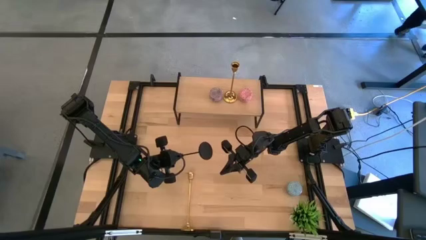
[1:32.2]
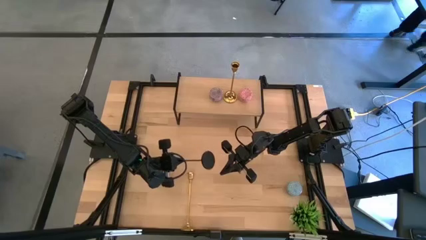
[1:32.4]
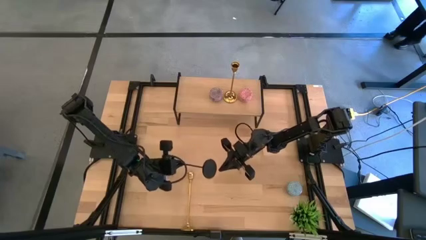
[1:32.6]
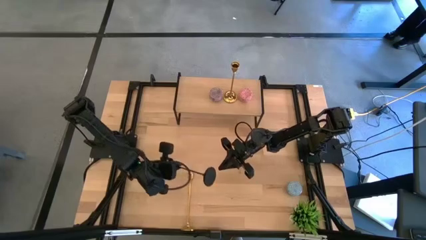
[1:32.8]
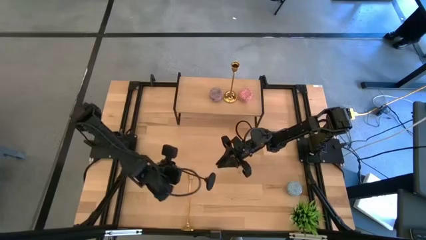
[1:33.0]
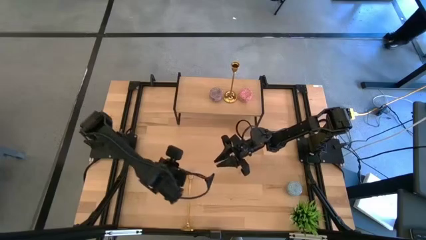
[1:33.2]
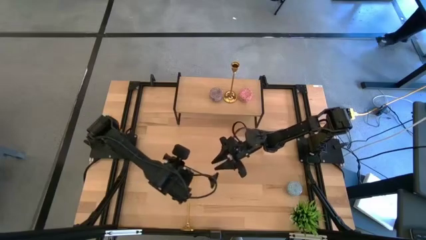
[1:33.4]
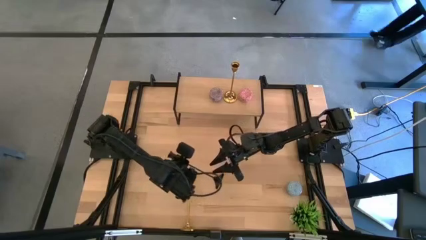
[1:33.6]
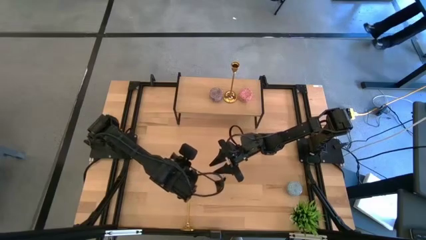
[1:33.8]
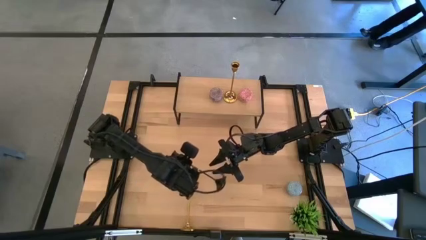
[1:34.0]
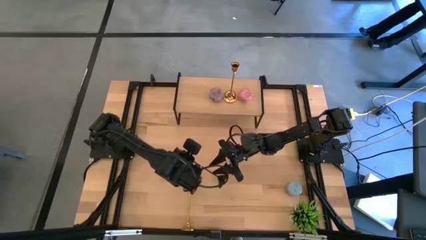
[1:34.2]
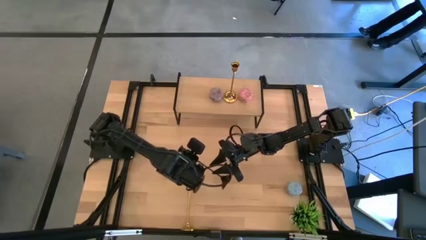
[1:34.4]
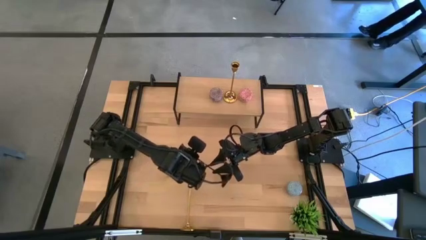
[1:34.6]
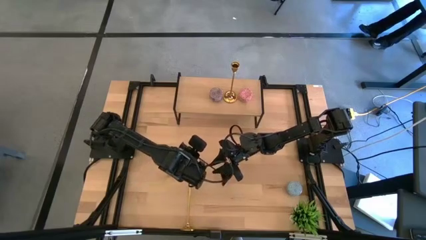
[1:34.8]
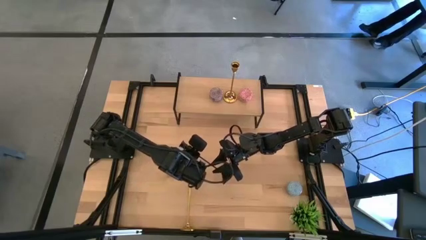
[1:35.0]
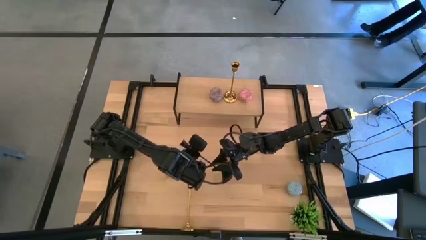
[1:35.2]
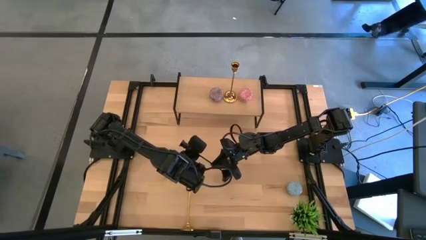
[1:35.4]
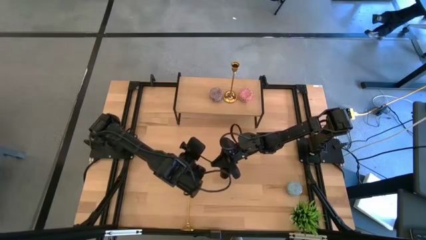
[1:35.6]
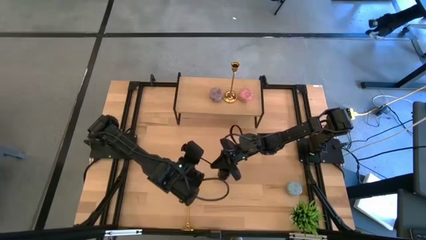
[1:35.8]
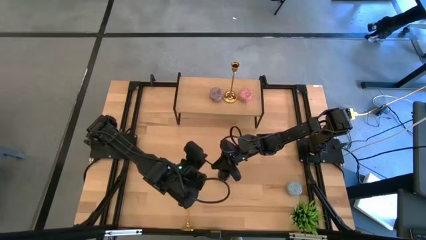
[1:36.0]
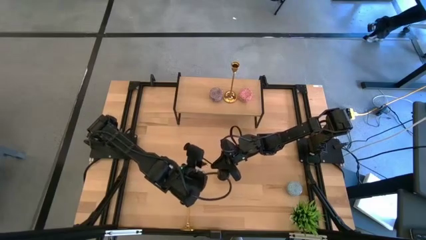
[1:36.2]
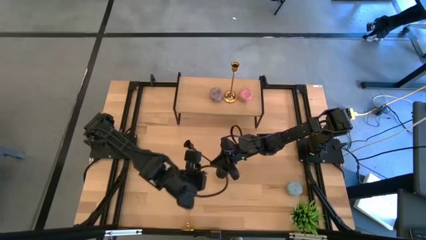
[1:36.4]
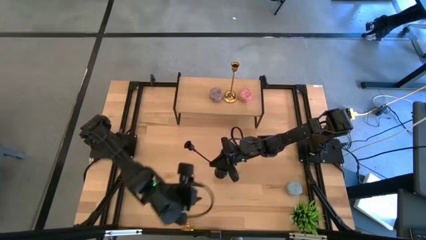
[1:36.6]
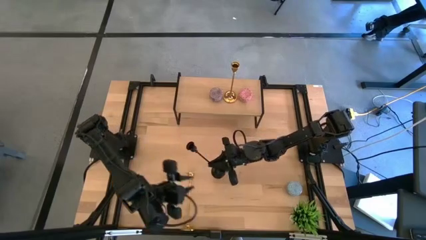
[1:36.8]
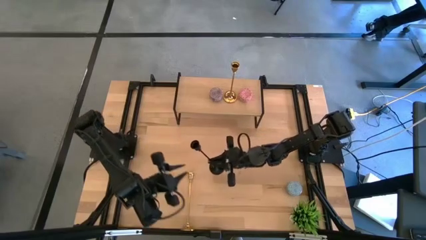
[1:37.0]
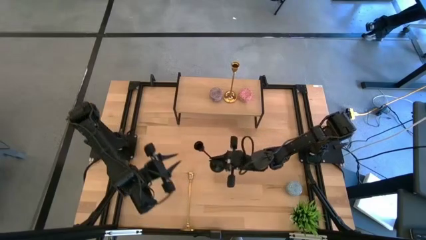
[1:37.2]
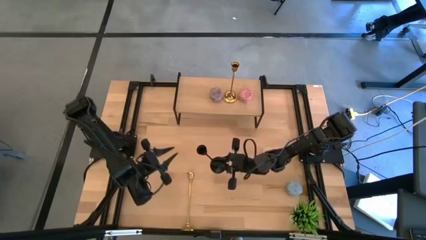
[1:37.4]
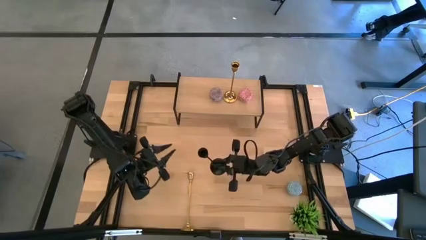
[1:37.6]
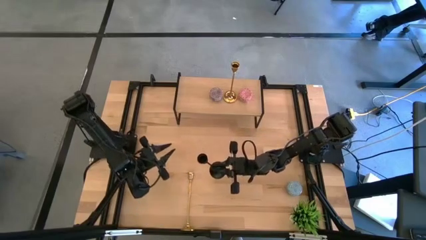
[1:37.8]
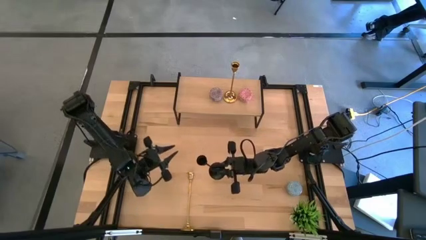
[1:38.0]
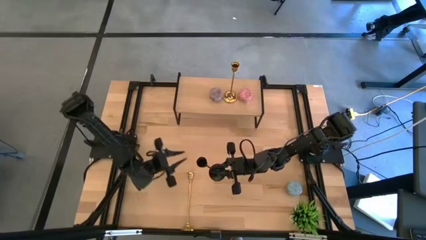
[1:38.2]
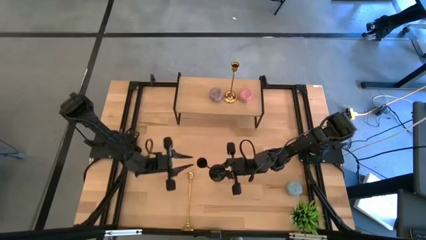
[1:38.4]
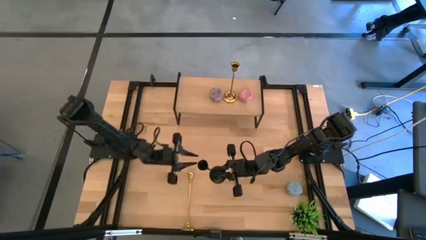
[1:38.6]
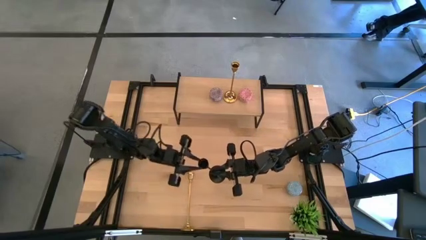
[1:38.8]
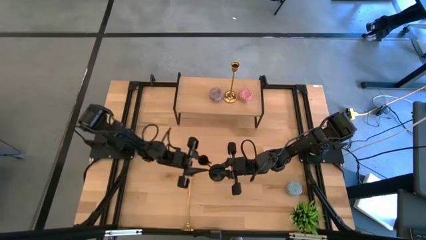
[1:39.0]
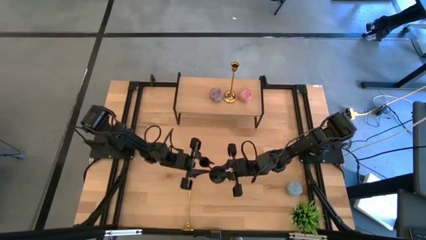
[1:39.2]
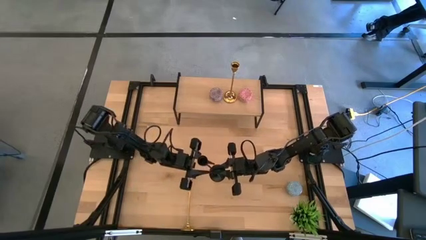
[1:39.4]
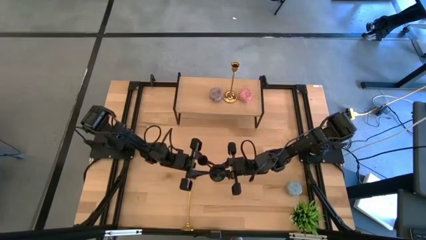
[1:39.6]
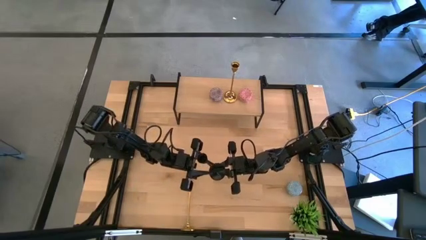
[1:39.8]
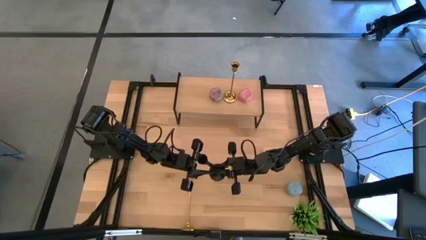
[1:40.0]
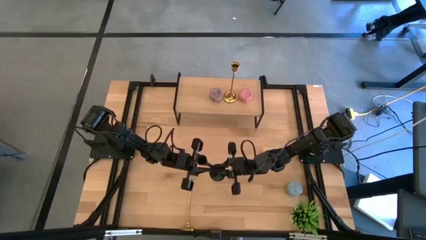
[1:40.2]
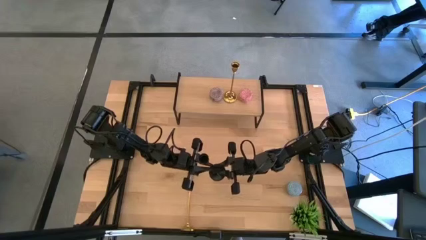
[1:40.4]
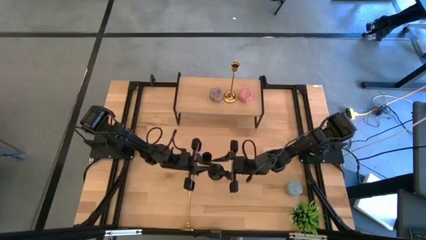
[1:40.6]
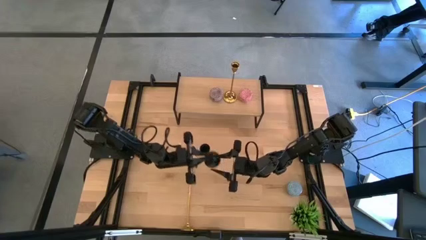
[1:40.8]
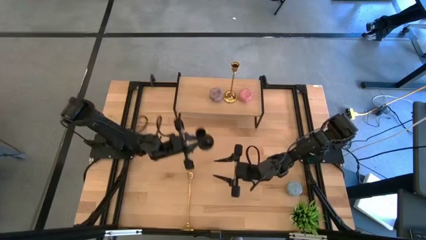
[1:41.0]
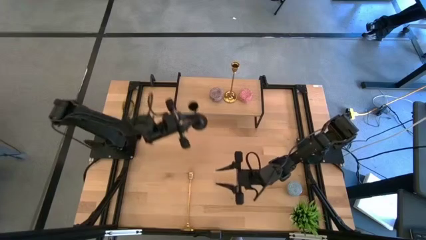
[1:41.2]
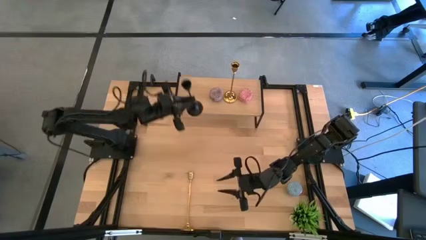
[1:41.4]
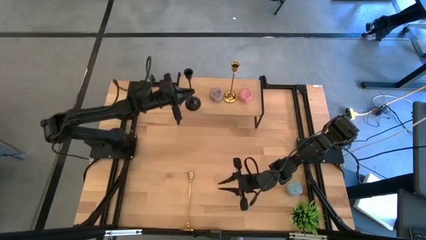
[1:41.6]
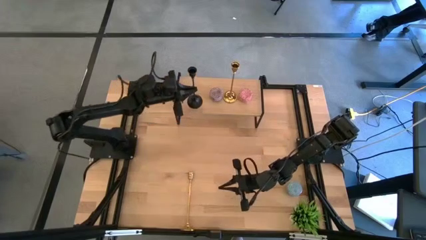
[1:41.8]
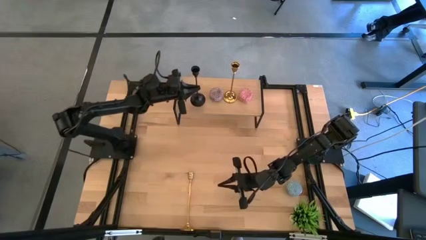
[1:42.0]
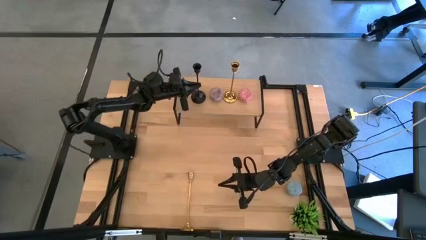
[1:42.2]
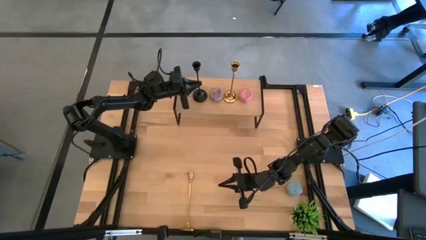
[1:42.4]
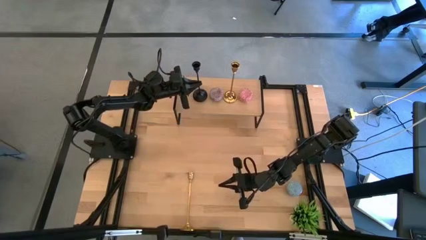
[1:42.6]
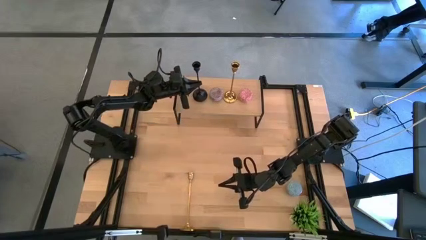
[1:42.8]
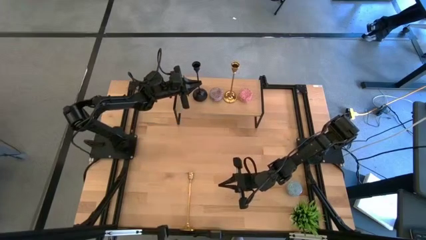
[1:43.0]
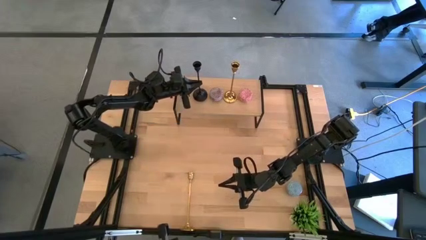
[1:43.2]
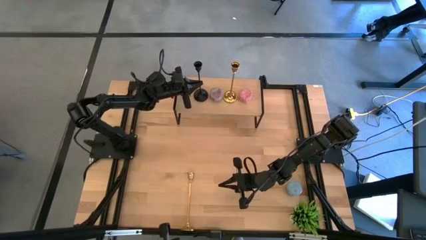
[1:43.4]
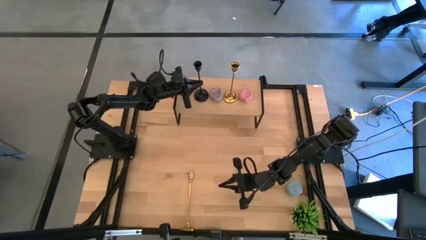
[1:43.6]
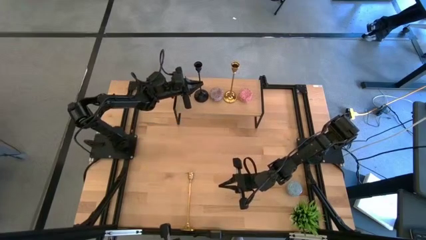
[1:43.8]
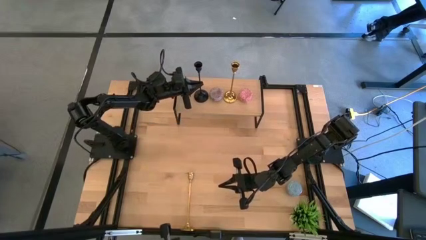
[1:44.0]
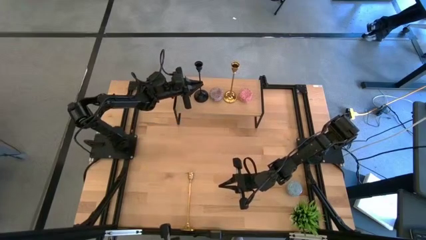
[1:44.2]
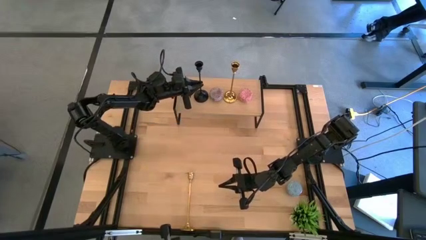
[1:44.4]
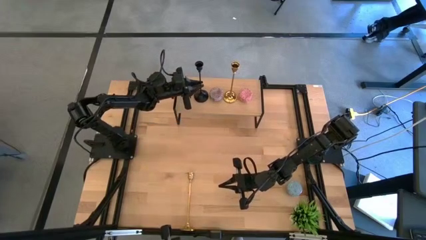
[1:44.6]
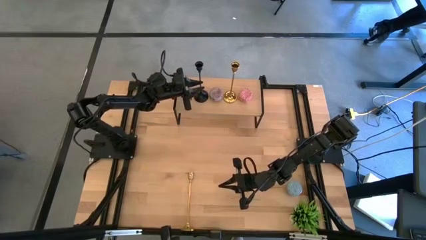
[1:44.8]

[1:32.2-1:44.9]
Task: Pick & Place candle stick holders
Put the black candle holder on the shelf

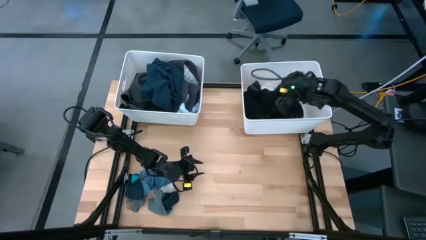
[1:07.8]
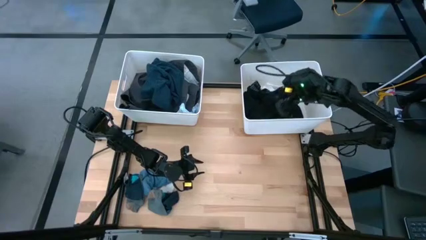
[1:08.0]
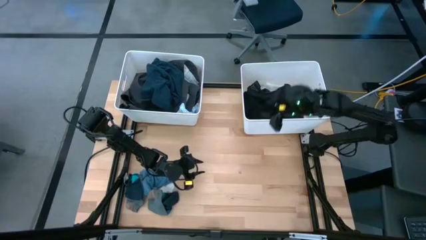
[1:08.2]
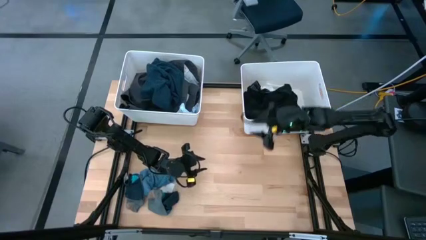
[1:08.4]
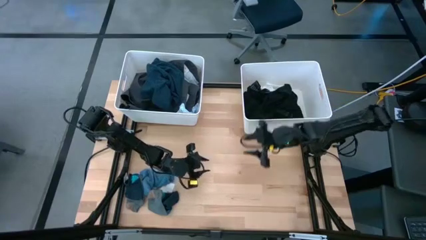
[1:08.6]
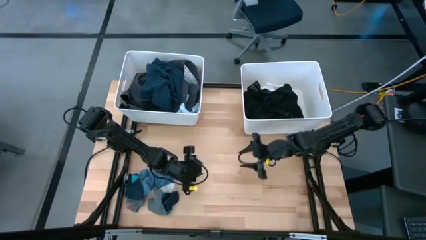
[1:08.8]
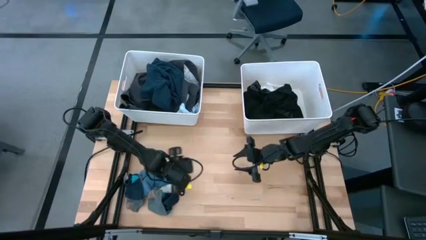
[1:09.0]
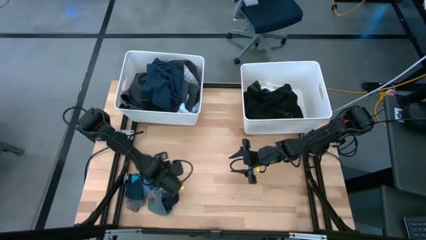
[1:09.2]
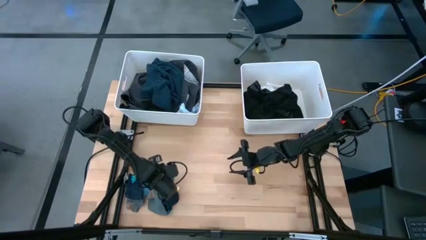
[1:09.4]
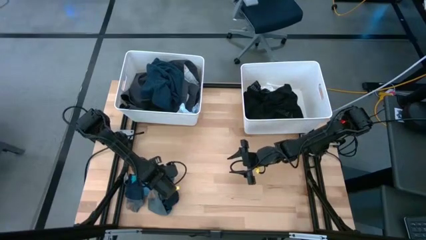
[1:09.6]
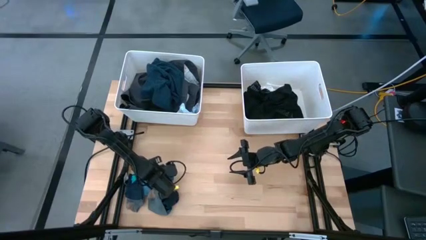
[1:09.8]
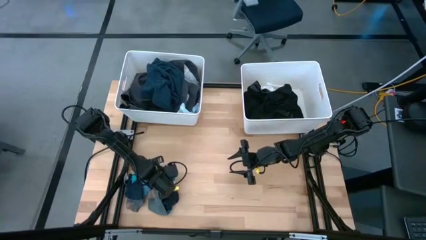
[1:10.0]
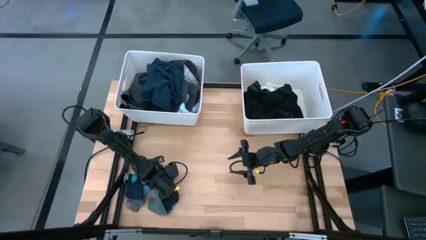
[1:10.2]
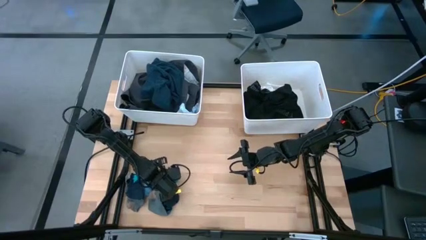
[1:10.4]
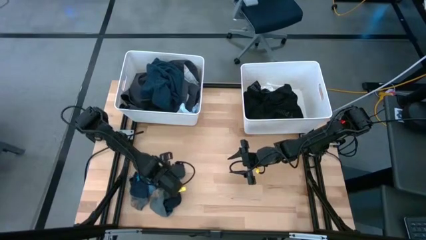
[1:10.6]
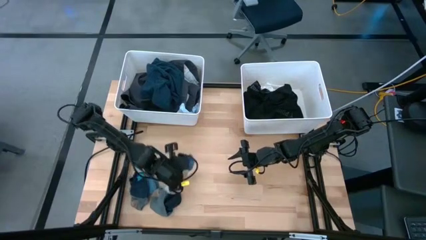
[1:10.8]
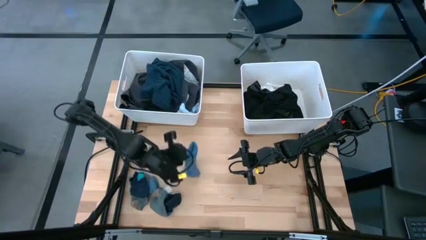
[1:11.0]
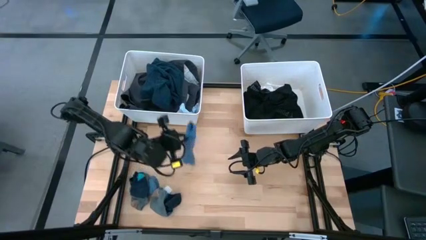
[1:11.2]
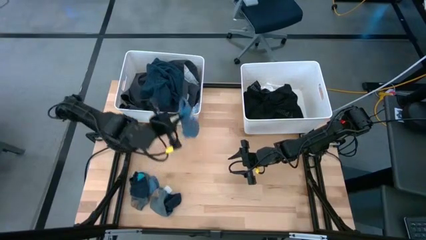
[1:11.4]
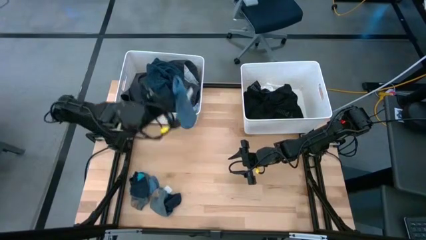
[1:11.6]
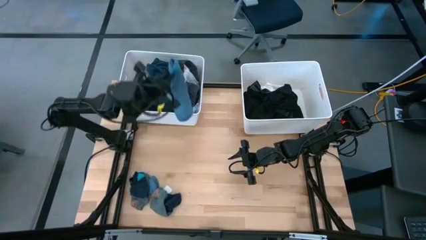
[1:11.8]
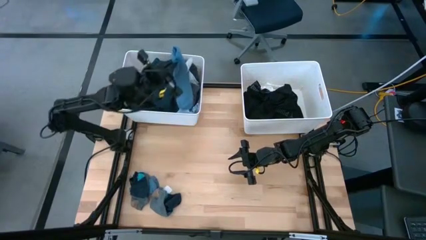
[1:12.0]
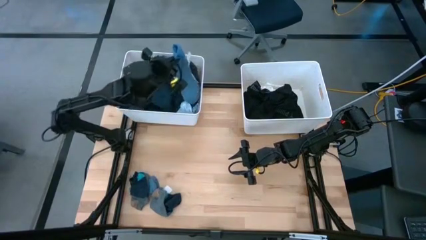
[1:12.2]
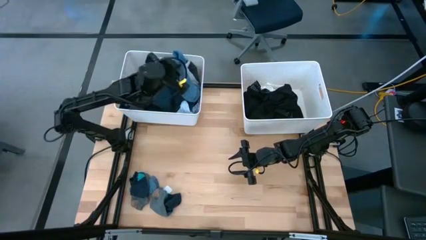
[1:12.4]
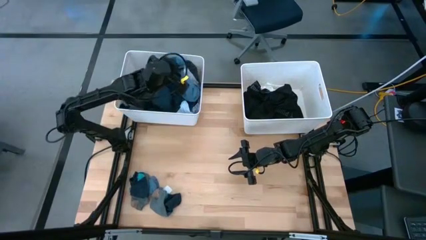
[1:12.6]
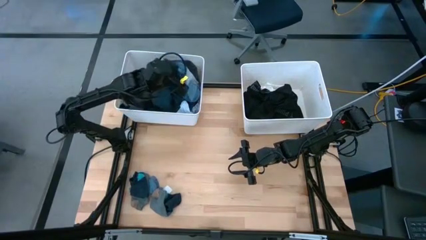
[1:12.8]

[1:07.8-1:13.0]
Task: Sort clothes
Put the top blue sock into the left white laundry bin
